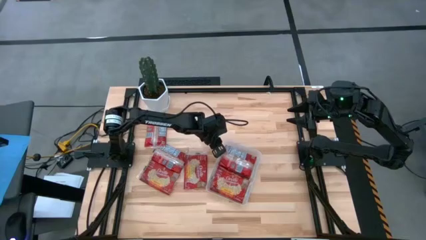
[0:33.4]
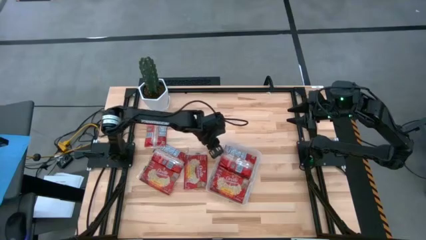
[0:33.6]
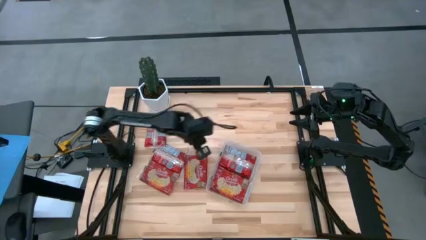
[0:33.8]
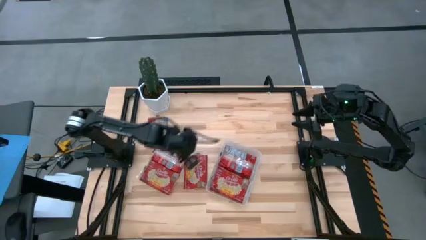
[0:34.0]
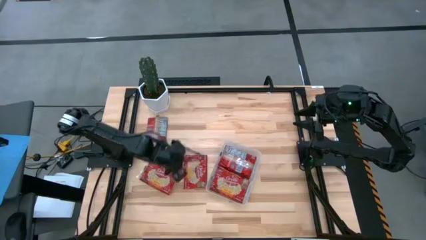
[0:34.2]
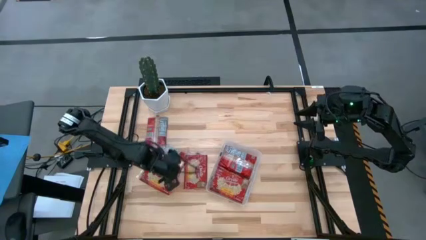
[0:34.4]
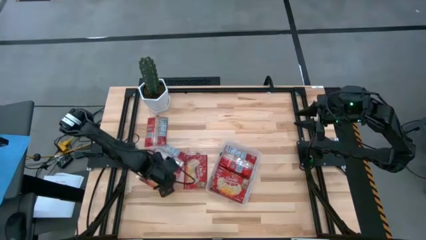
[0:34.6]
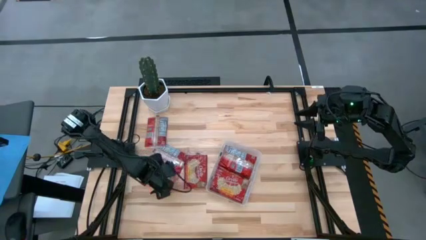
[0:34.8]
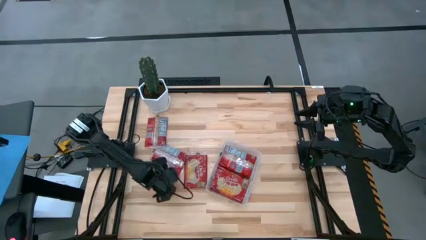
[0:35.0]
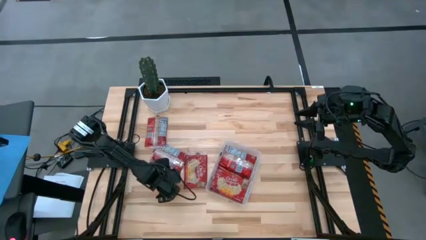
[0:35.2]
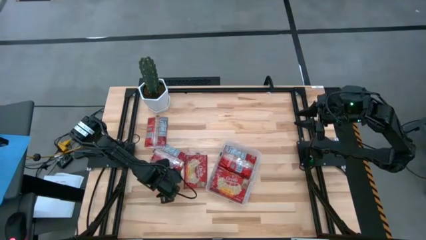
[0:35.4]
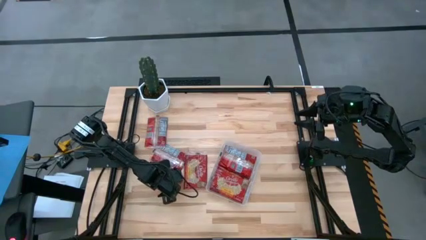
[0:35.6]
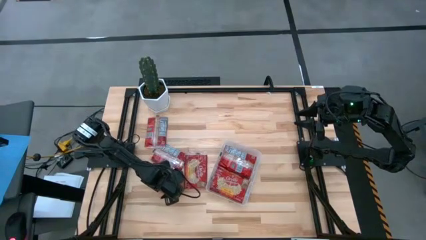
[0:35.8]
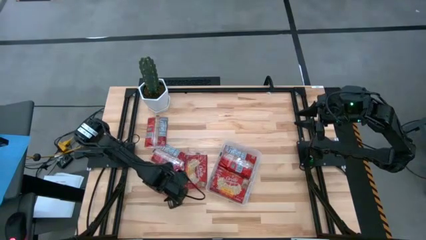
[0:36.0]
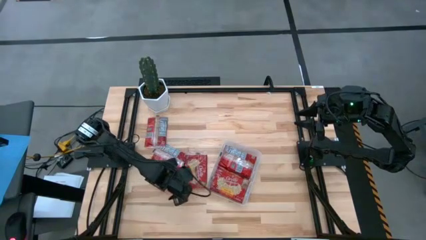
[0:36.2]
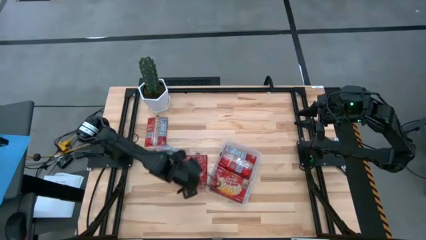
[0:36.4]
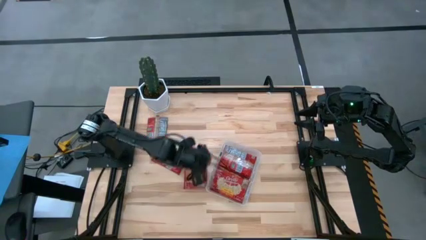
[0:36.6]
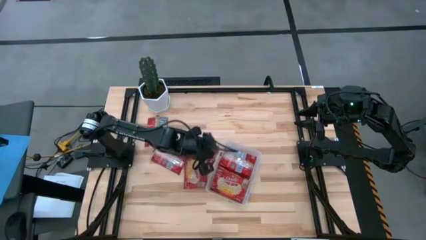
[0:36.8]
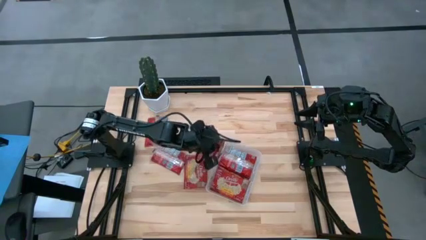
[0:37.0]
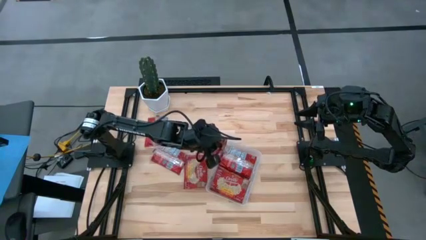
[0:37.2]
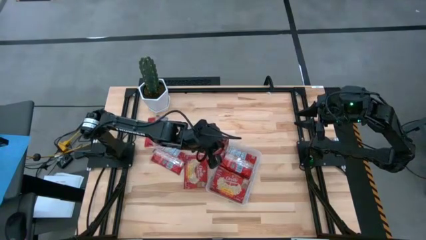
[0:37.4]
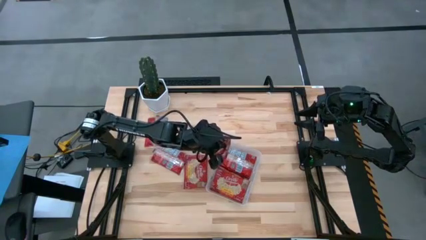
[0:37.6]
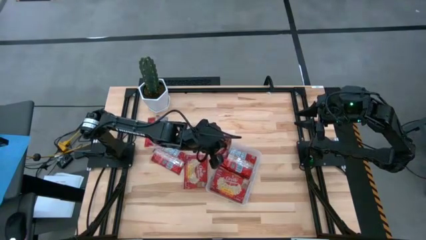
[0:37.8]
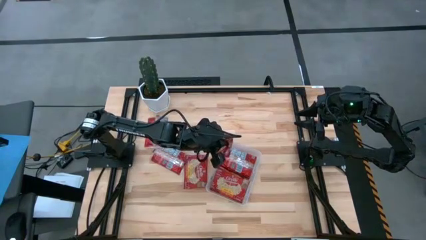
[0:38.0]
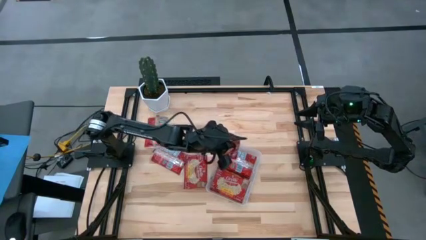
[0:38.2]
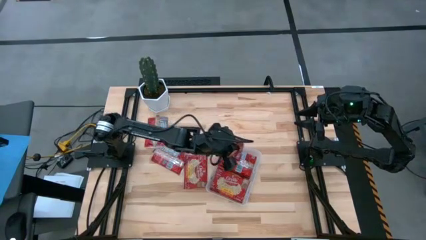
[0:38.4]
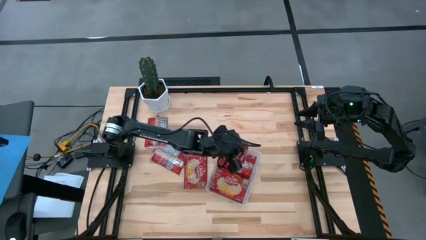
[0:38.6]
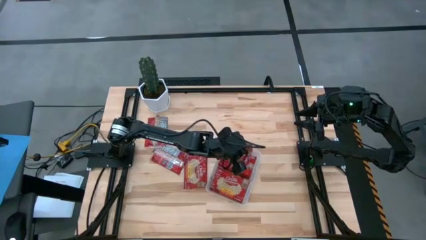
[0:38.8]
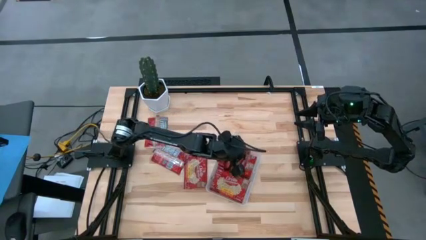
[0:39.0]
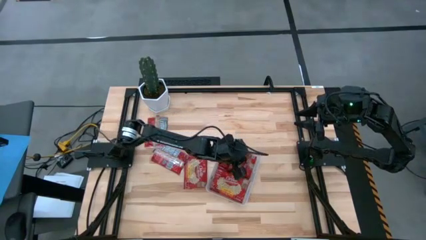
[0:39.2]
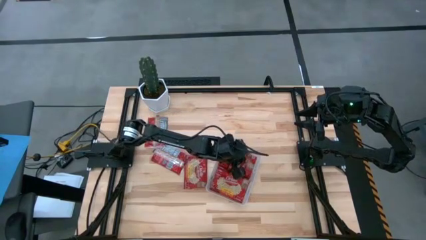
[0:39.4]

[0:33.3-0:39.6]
Task: Sort popcorn bags into baskets
Put the red popcorn bag into the transparent bin

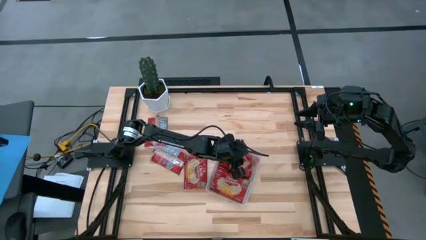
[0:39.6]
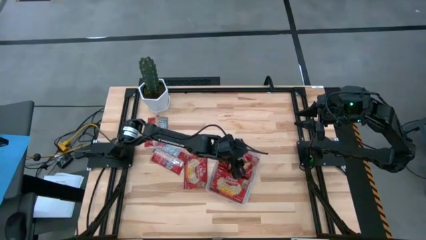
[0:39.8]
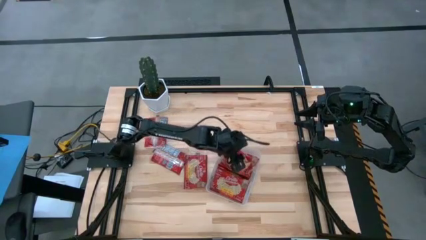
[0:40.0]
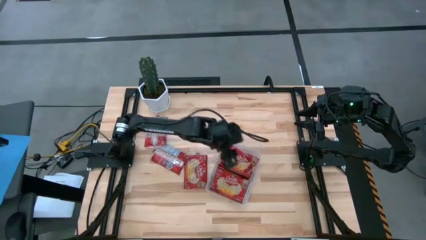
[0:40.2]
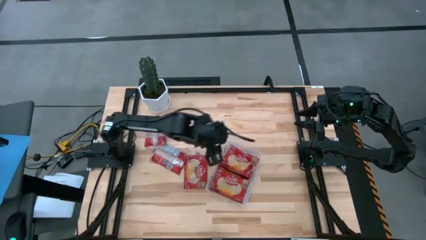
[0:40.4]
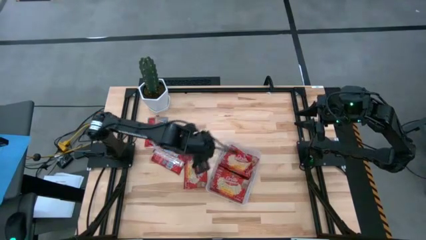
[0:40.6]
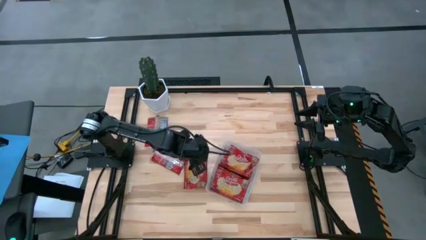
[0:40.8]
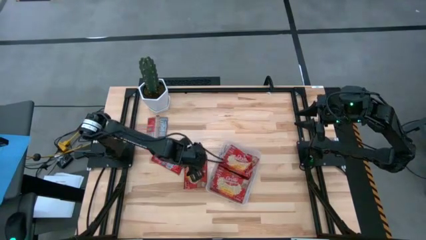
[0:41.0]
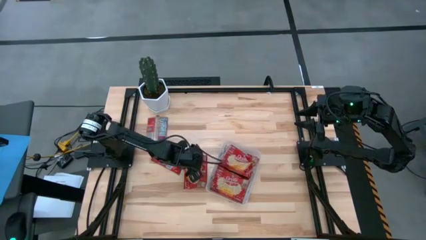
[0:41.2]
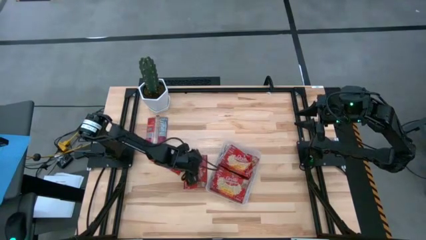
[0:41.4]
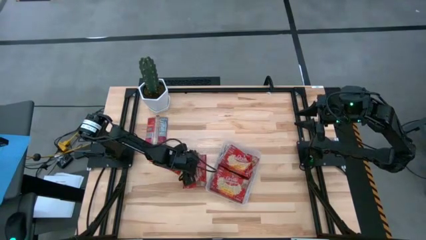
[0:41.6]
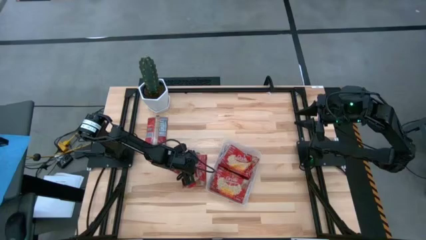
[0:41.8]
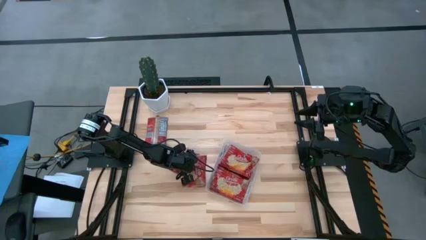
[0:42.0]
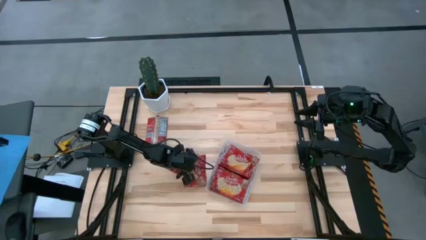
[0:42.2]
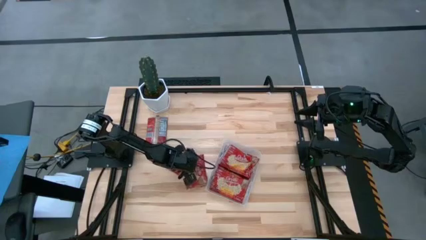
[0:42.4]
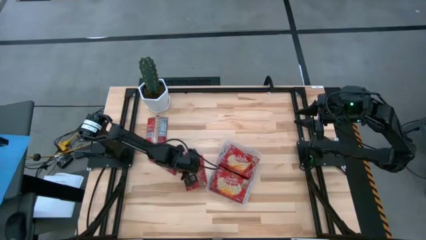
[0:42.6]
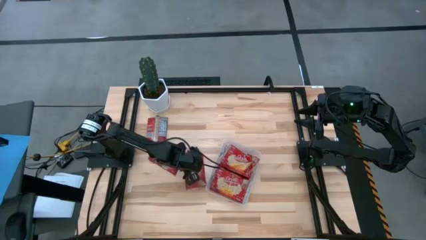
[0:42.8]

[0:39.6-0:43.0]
Put the red popcorn bag into the transparent bin

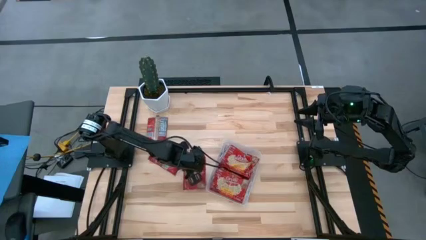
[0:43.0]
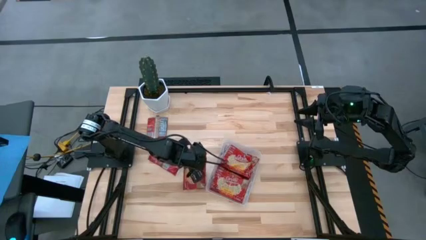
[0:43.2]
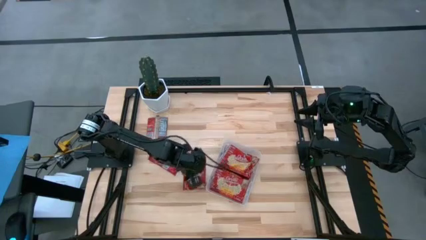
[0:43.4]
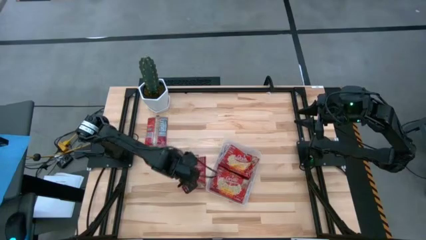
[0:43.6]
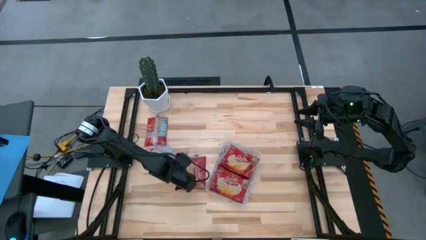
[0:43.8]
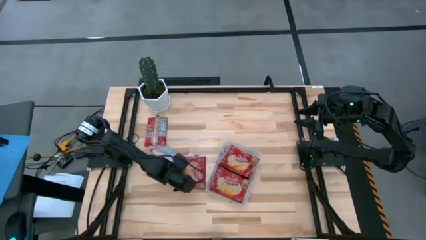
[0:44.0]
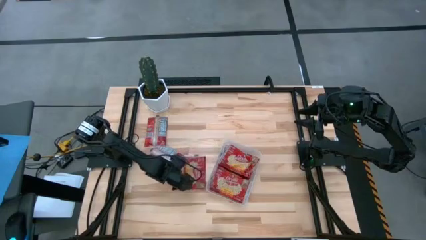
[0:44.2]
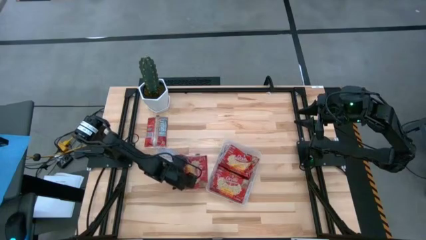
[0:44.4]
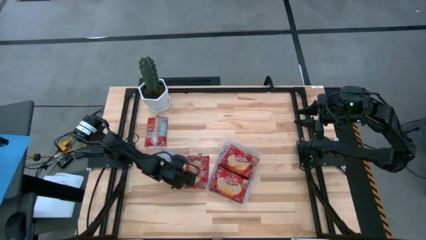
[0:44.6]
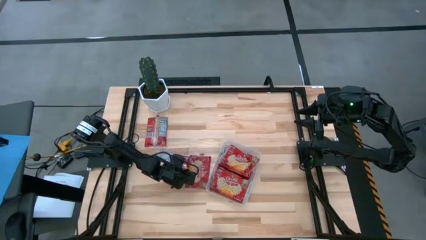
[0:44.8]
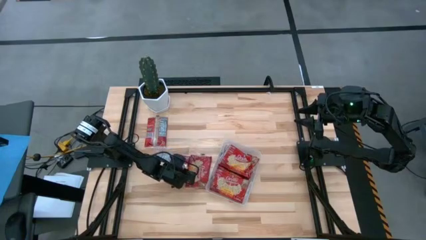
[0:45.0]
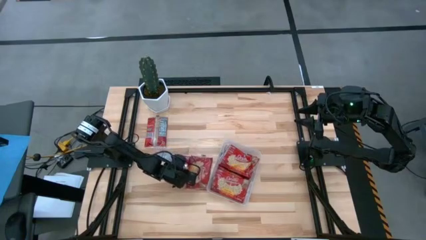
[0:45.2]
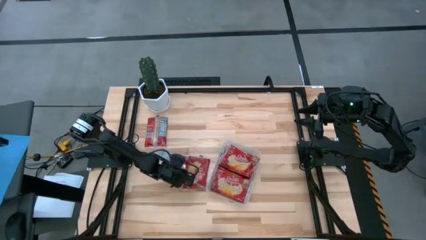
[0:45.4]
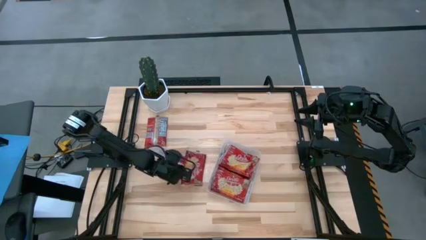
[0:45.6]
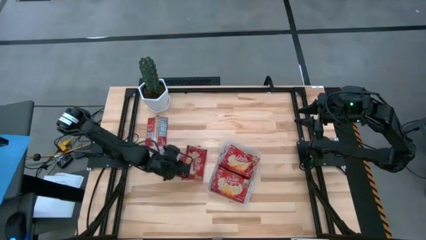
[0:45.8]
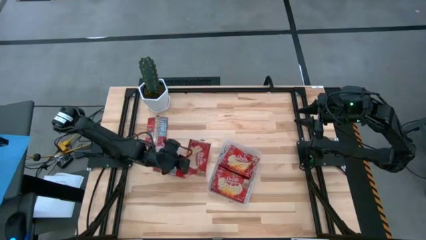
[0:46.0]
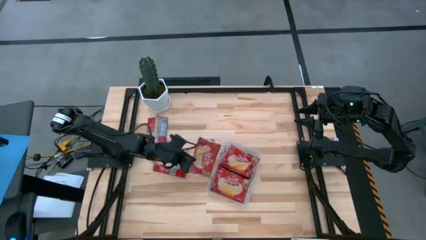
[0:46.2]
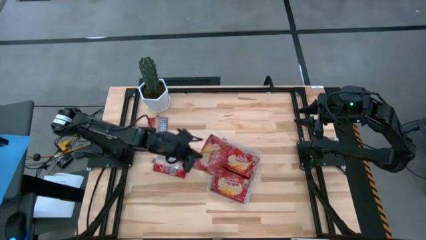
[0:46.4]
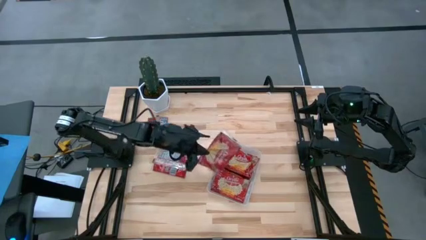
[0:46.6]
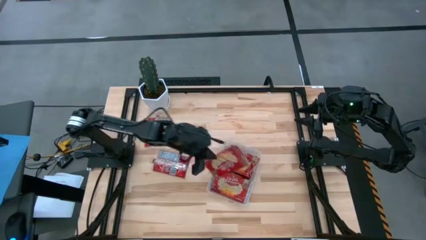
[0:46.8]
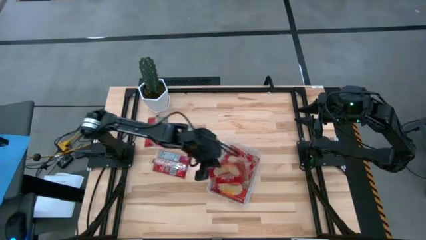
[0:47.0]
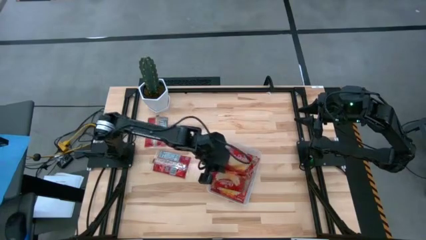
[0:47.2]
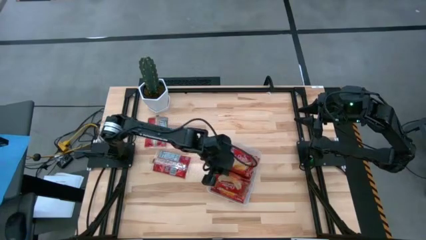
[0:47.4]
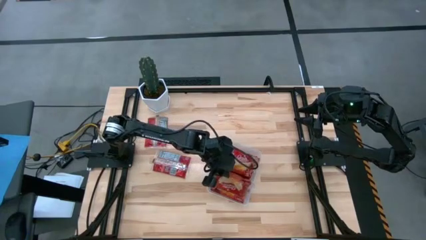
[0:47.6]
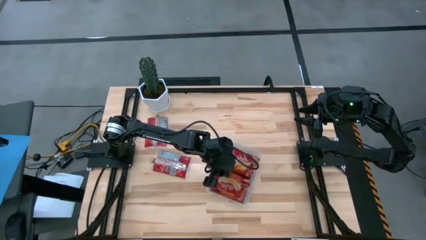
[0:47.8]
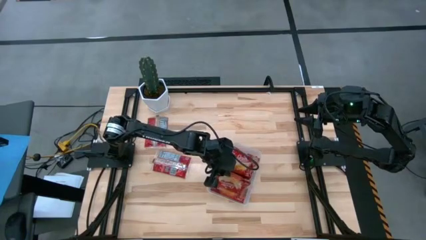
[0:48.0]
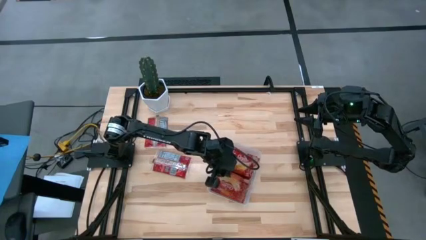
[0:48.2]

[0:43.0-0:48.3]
Put the red popcorn bag into the transparent bin

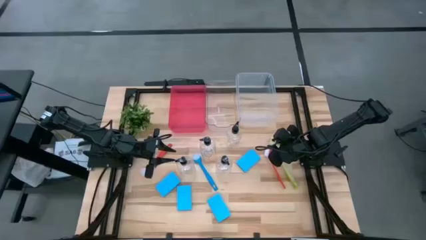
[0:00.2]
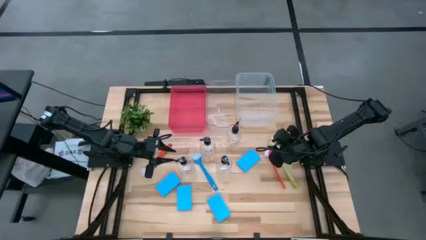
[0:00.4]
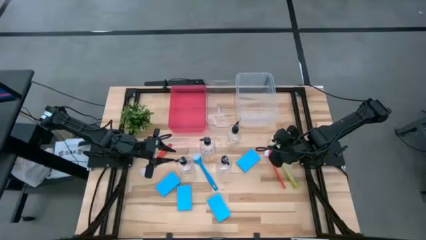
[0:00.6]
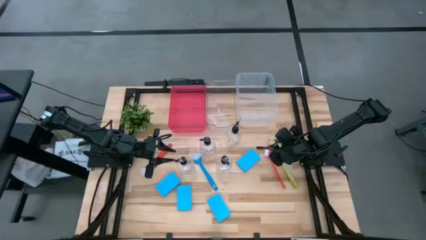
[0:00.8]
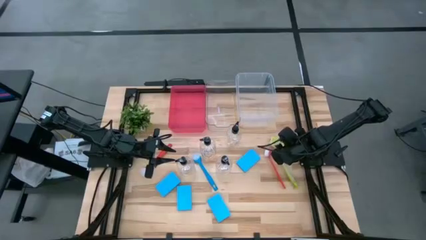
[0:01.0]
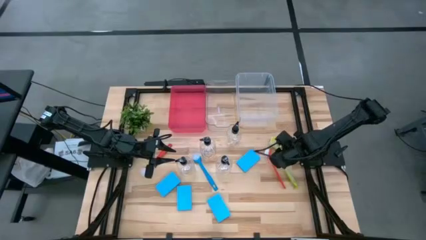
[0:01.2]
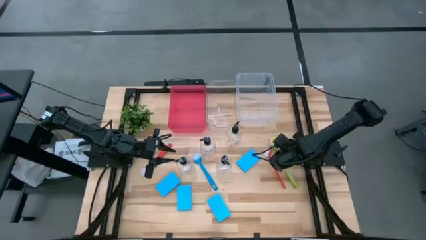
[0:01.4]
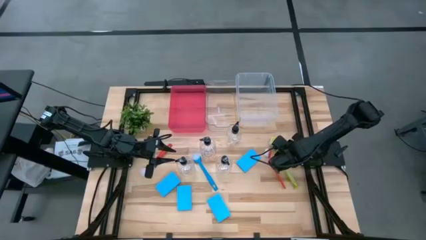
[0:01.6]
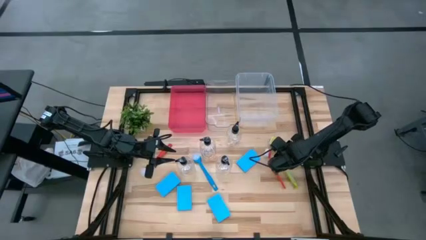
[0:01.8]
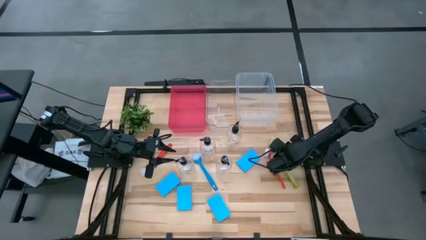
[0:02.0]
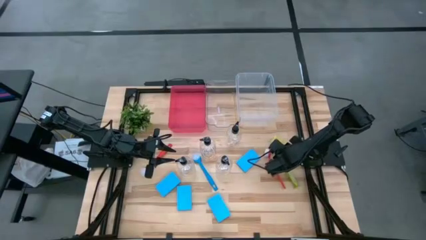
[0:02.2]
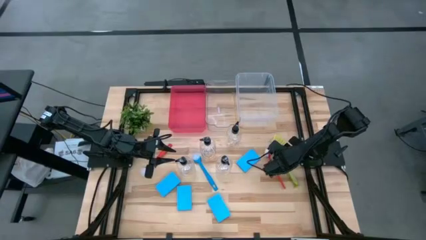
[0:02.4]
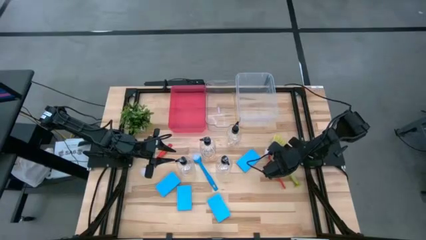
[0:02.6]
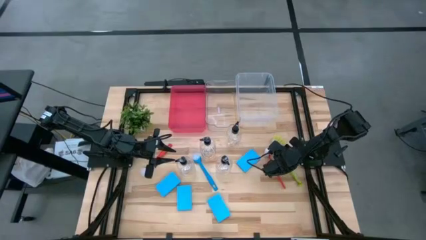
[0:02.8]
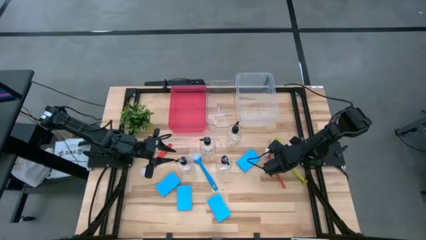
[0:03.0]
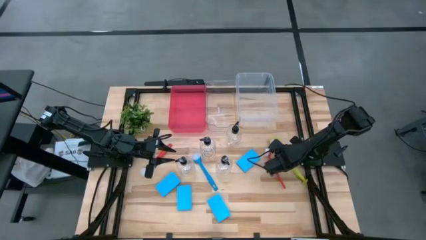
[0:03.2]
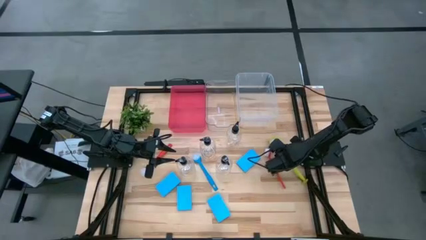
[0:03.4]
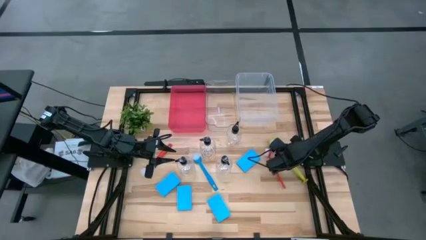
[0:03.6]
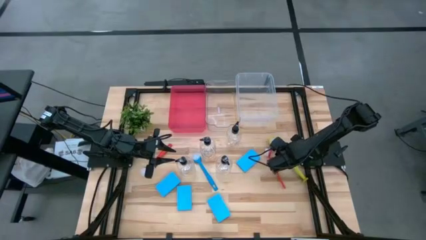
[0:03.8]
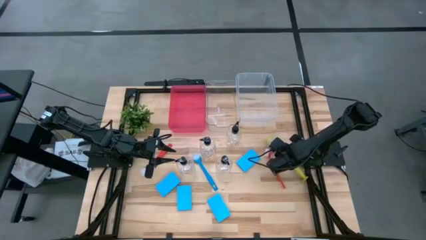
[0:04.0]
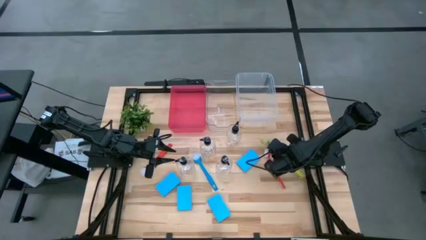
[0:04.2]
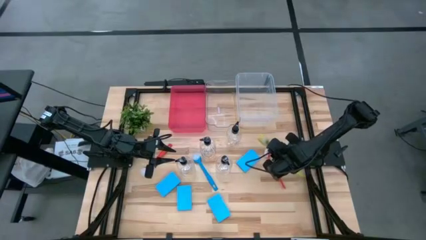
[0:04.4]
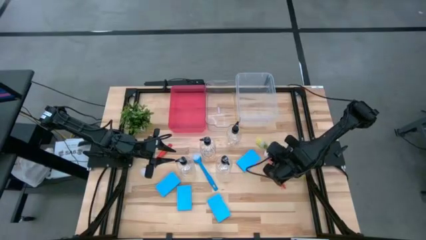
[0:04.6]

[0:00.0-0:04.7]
Task: Pick & Place Kitchen Sink Supplies
Put the yellow kitchen brush into the white bin
